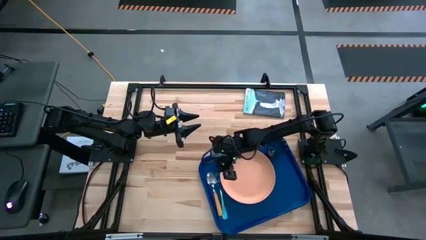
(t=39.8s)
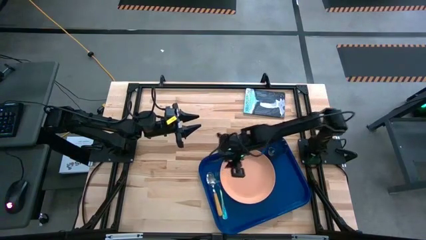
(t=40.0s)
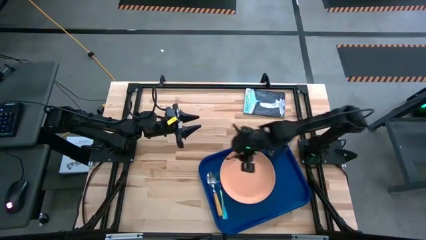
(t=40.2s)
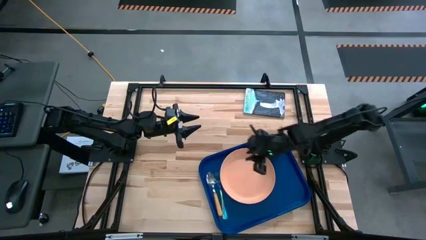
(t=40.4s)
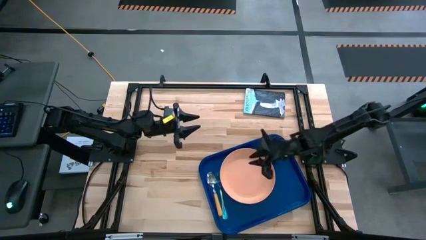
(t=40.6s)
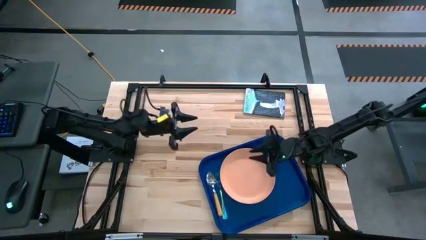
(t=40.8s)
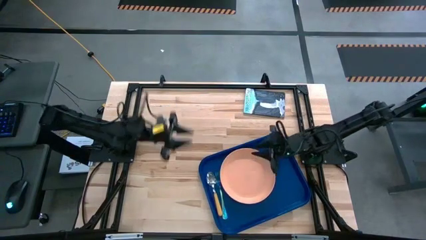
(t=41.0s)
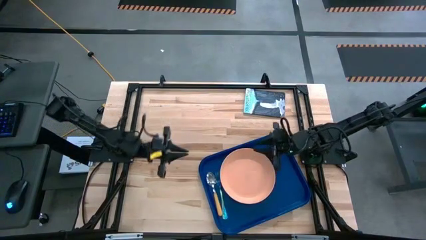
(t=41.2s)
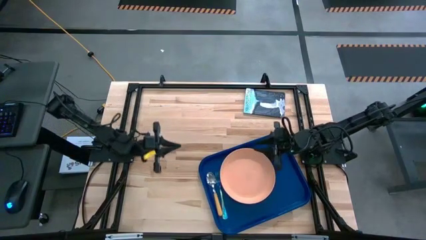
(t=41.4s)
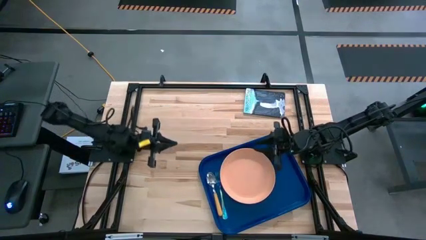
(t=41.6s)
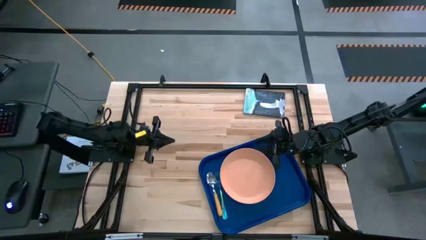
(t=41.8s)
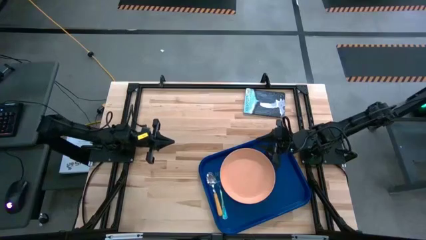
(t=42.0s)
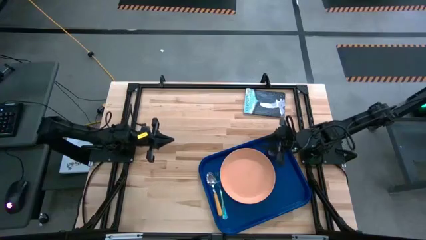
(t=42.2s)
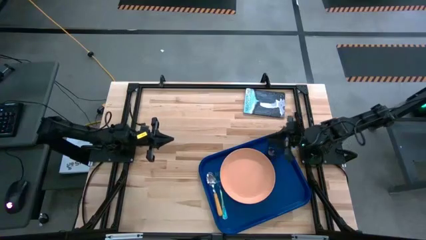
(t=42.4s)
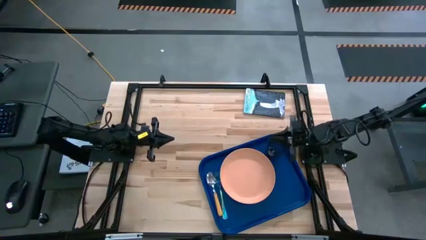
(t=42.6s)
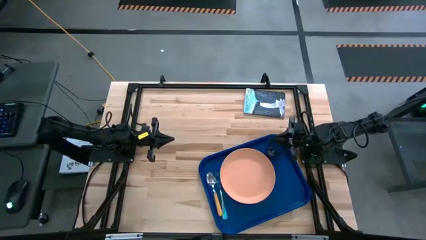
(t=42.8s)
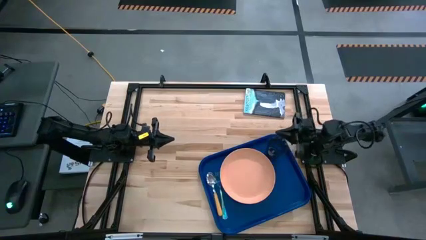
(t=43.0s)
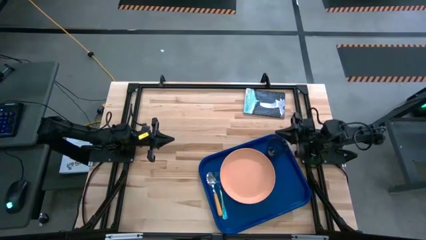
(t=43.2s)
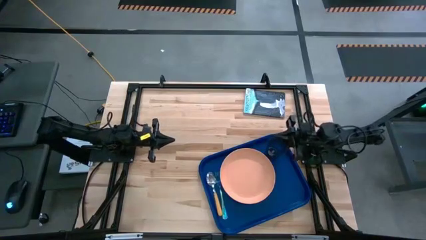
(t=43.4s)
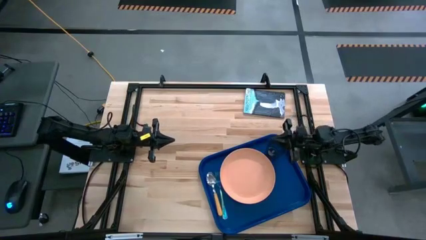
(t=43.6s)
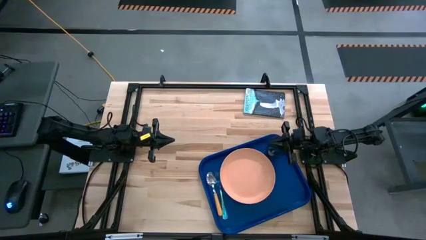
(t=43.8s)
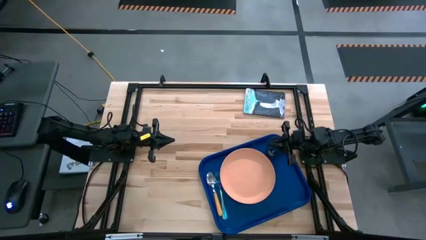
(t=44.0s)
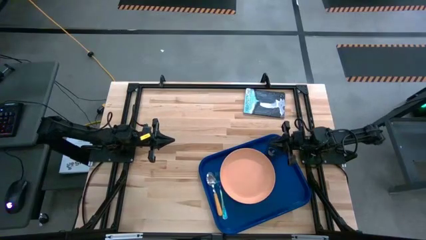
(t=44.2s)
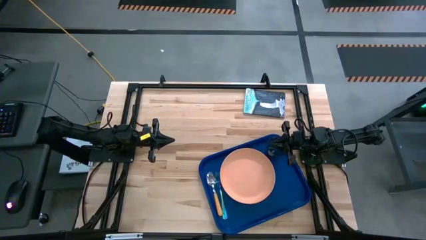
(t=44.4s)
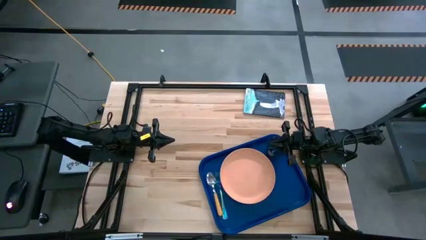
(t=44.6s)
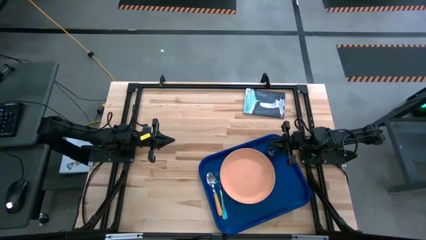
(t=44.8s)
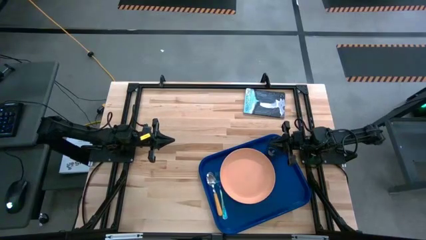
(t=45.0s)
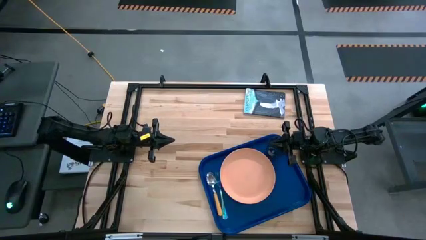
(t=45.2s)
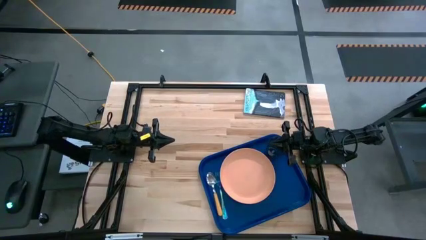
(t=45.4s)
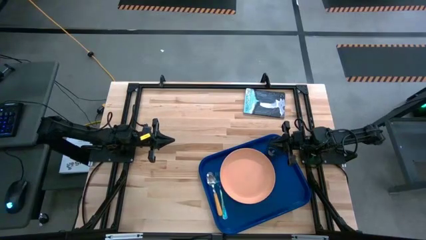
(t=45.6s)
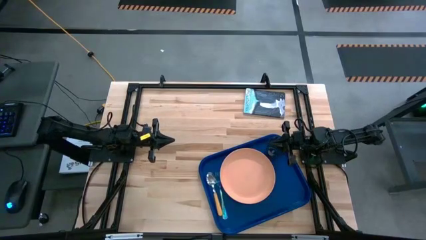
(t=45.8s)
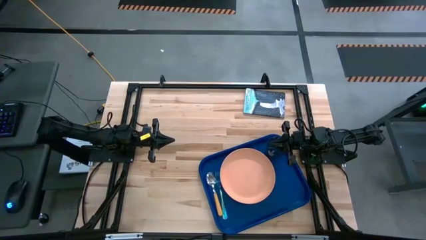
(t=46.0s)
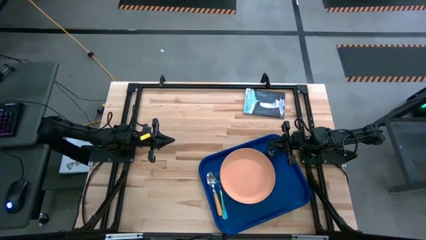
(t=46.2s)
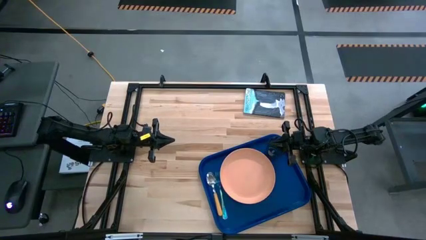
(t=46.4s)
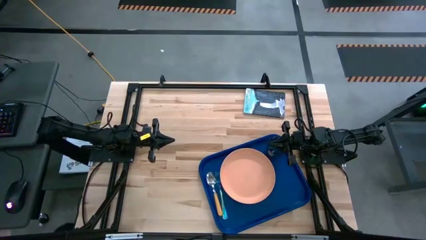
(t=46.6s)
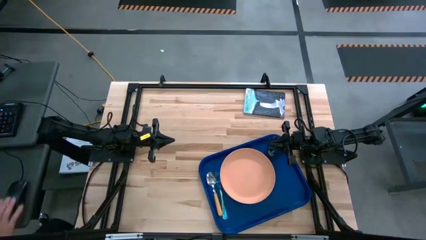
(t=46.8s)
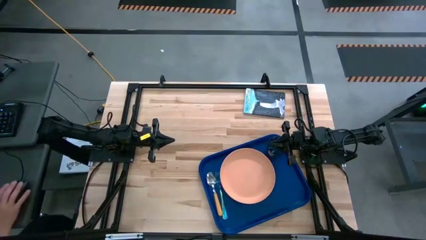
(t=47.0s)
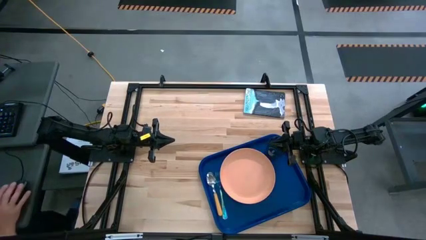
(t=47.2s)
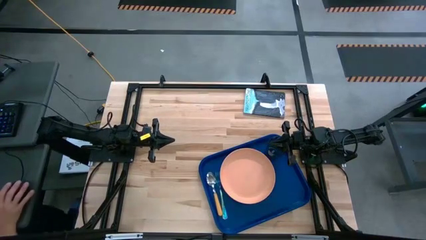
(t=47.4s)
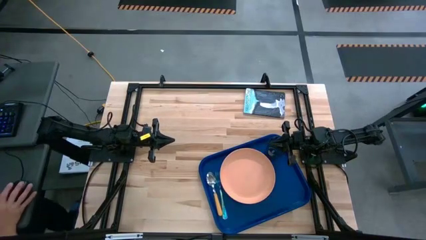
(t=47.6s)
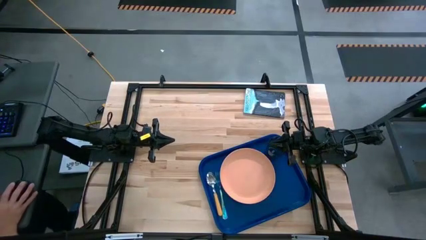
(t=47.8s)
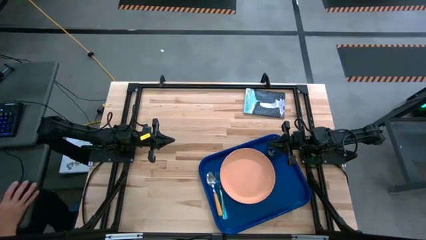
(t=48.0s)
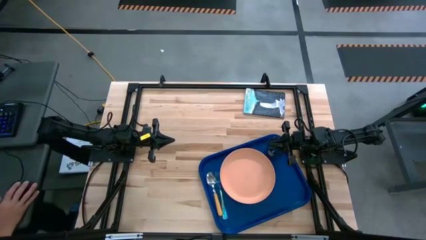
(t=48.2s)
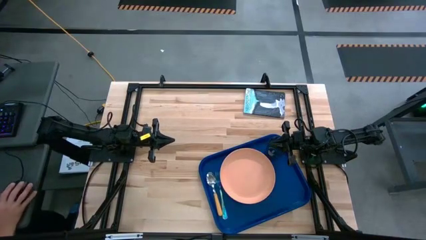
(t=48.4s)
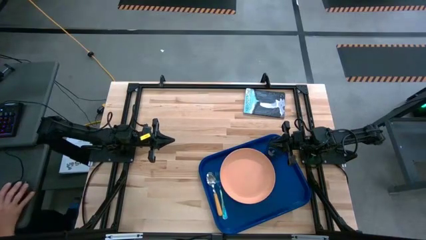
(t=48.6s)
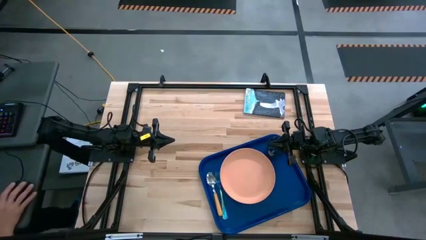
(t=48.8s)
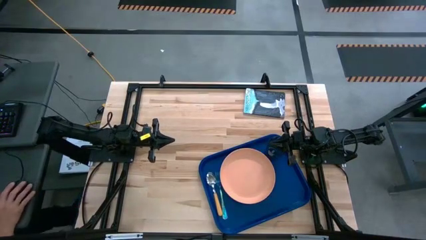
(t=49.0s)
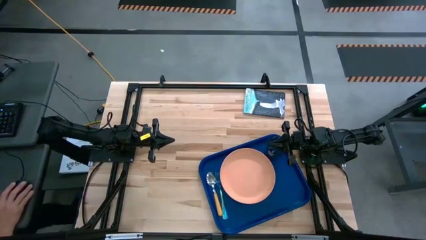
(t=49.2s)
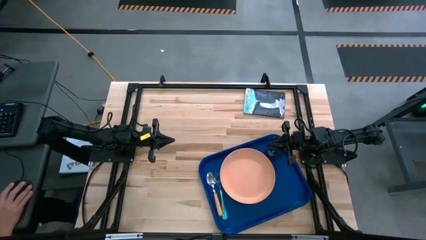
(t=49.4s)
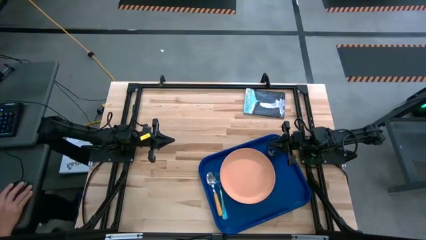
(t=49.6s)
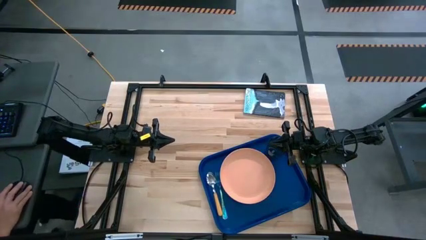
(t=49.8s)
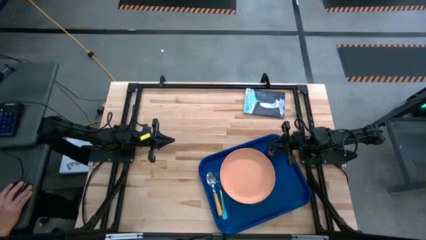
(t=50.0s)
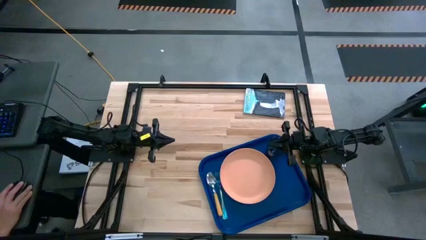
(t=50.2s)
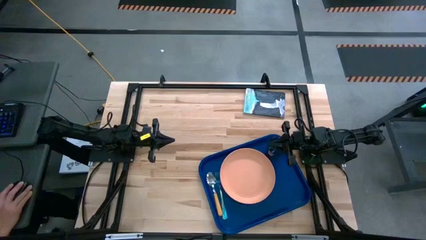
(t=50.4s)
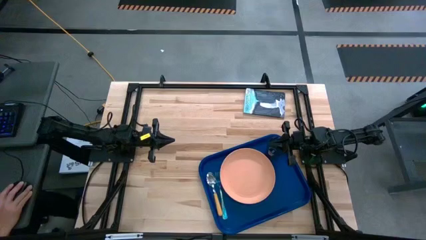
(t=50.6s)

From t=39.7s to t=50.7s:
Task: Pick and place plate/cup/fork/spoon on tray
Return to Home Position

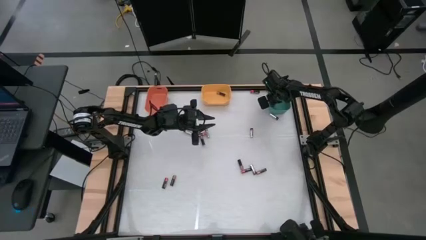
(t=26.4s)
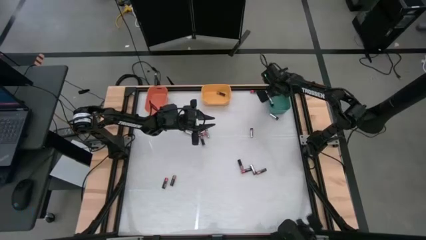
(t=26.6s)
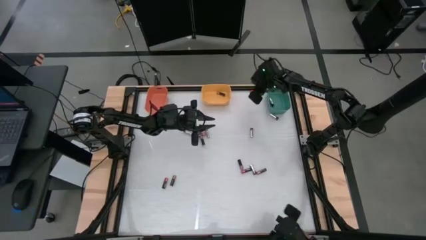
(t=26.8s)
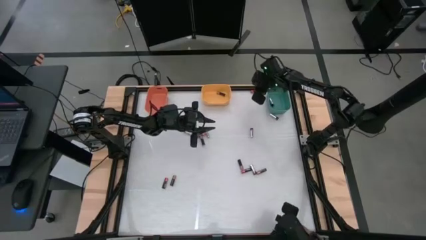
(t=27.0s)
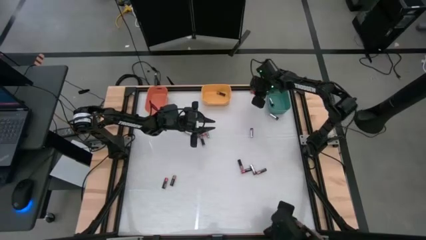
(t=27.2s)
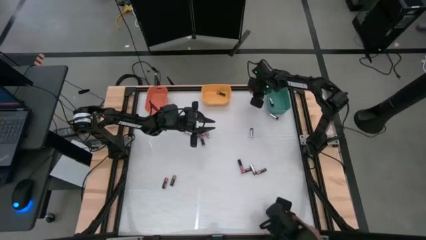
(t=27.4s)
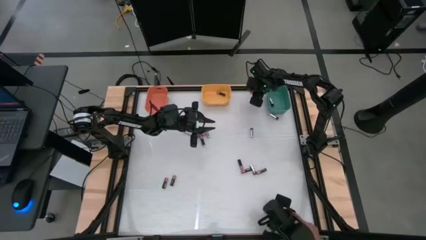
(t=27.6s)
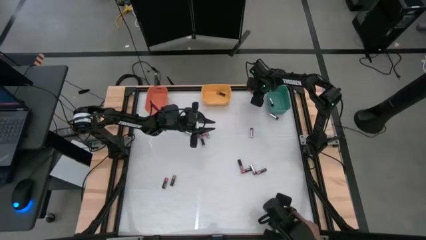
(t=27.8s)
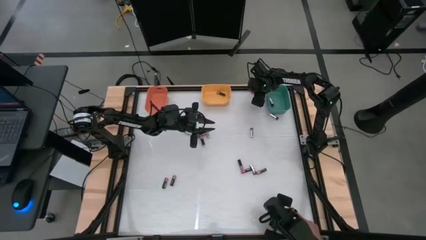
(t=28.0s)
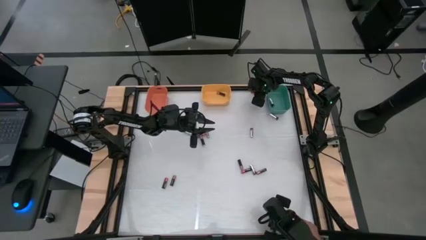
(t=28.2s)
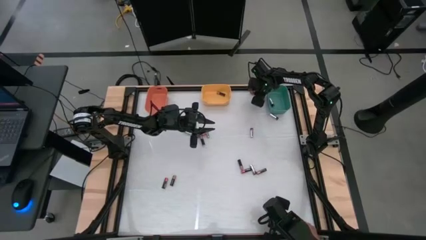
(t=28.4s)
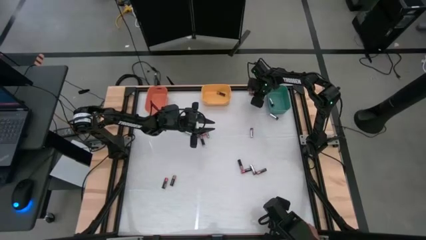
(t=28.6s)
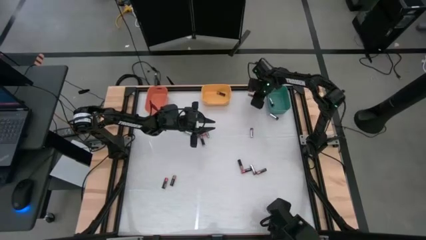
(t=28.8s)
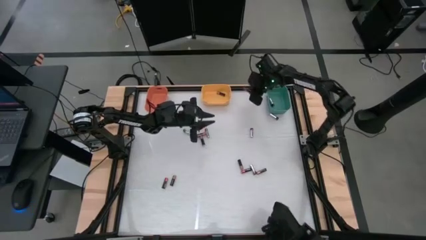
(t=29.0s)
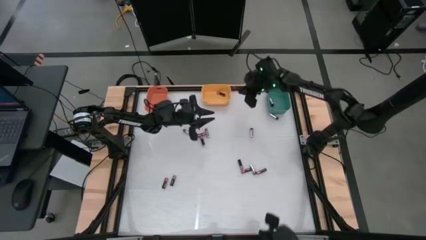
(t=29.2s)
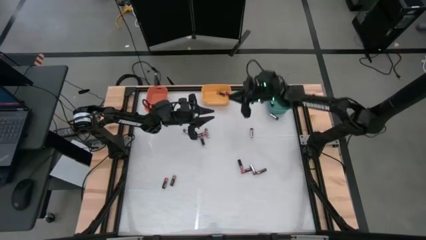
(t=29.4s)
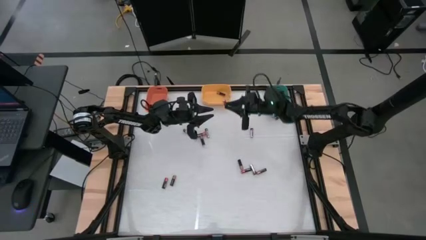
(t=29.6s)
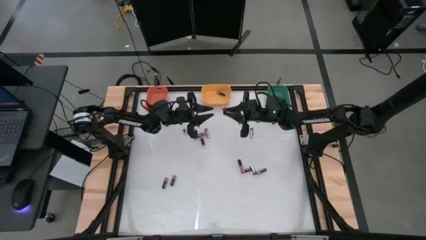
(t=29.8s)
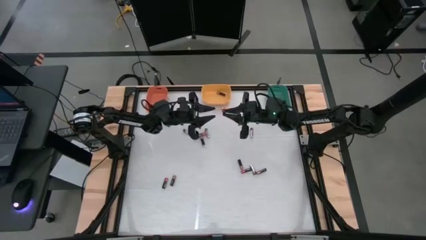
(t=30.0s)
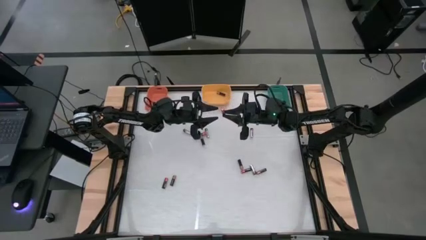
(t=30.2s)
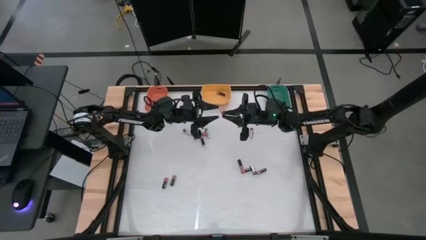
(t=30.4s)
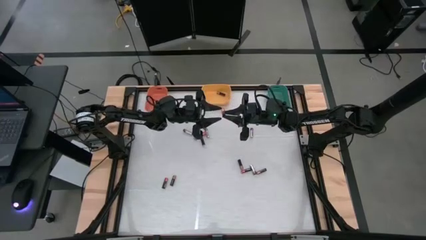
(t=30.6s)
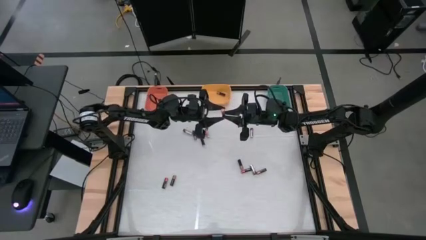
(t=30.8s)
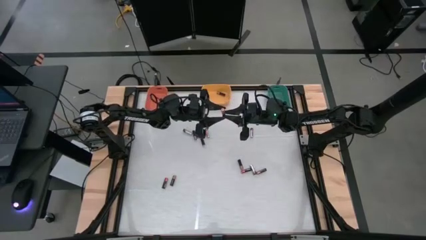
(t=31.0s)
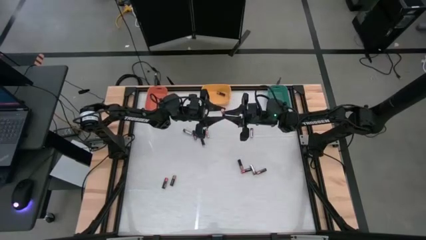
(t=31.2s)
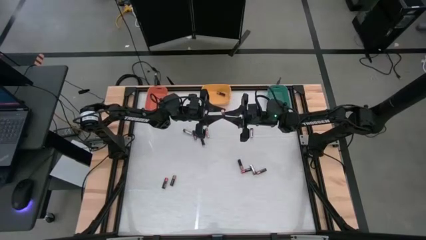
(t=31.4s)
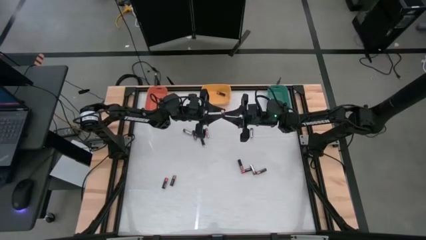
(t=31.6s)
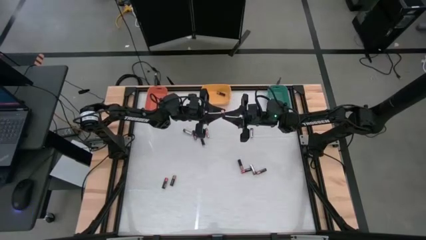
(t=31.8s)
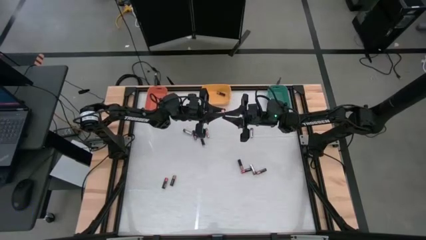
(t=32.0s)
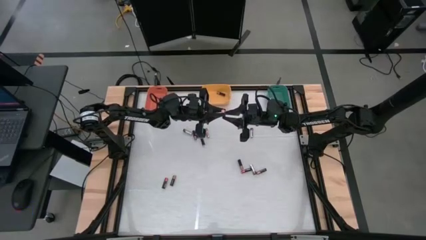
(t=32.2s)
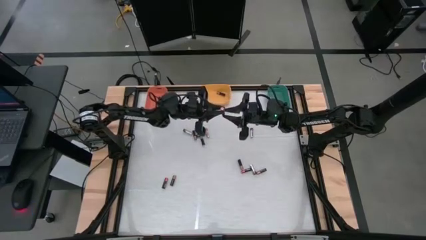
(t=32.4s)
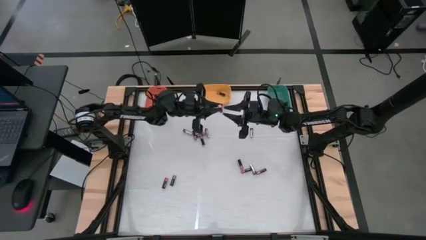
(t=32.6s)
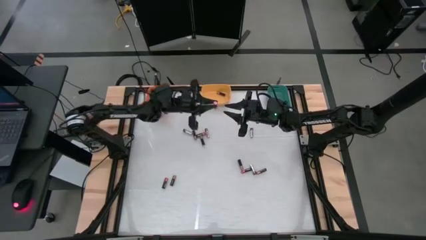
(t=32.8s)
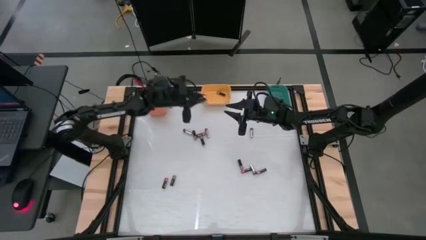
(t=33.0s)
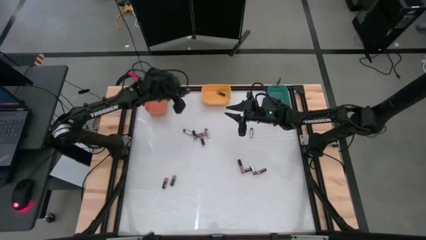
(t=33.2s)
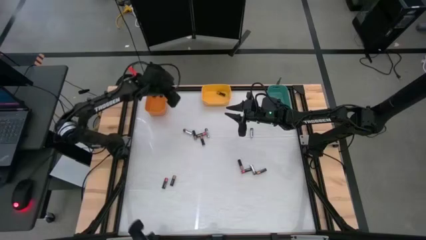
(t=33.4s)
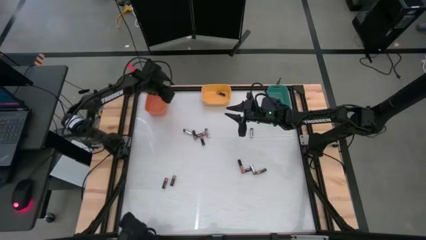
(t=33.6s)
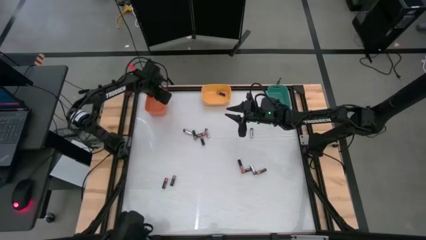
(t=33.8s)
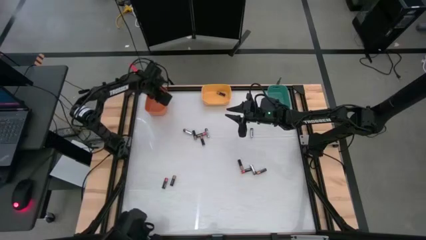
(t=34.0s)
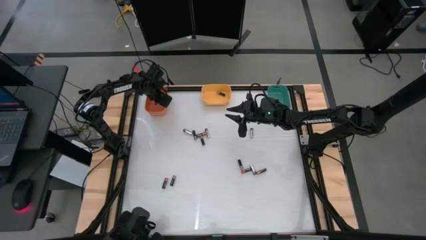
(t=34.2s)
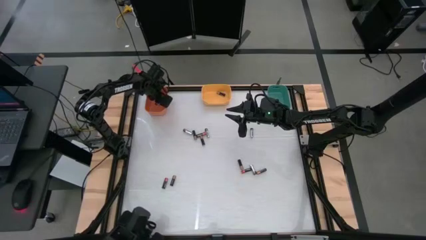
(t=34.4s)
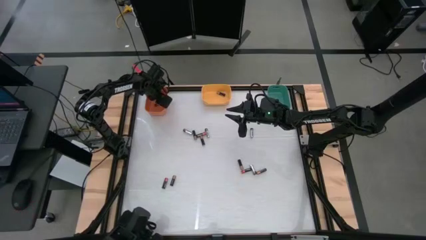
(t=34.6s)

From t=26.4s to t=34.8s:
Task: Sort batteries
Put the red battery into the orange bin
